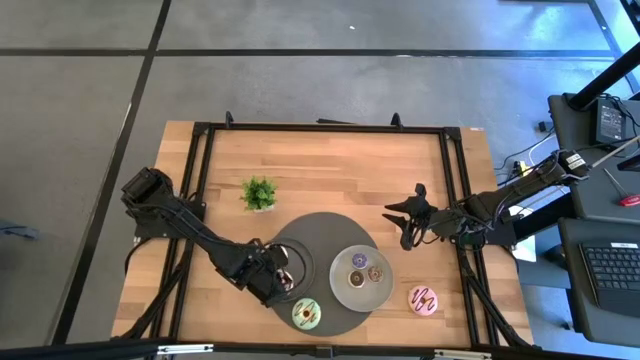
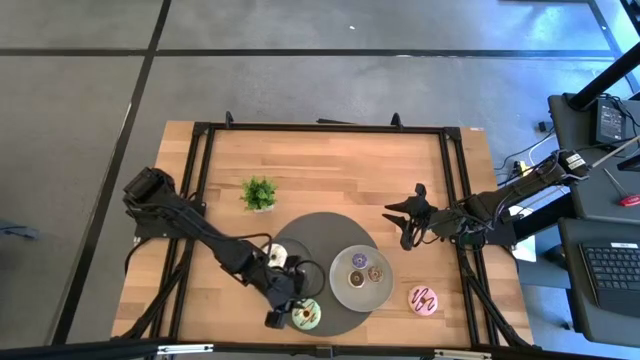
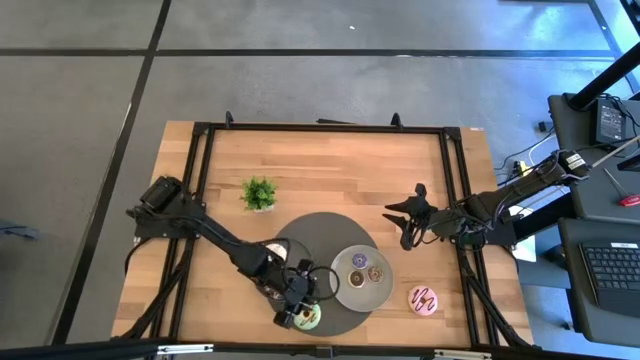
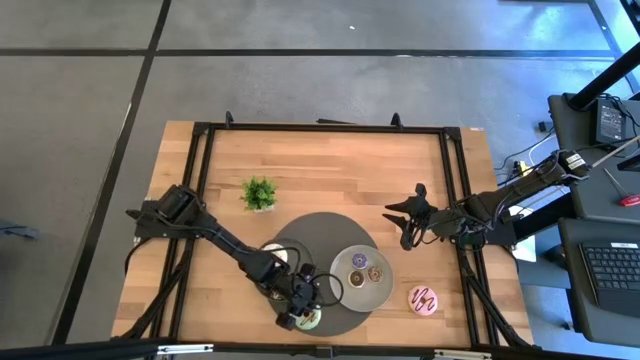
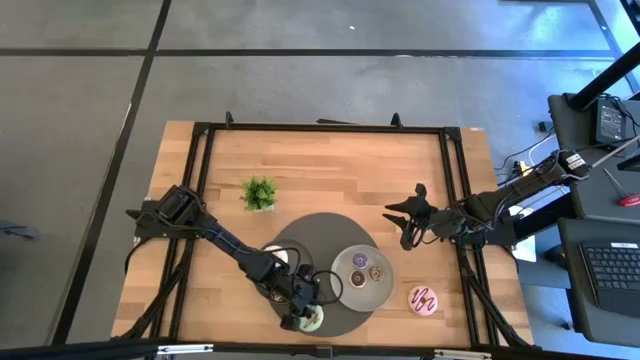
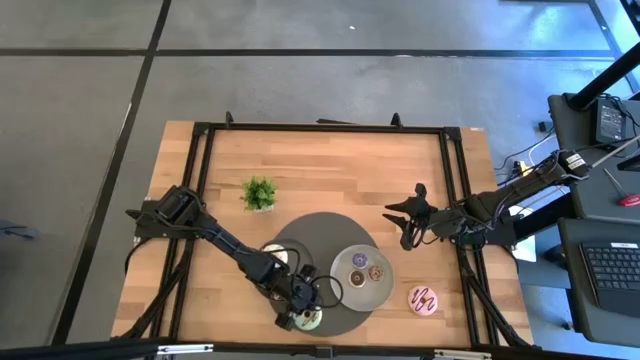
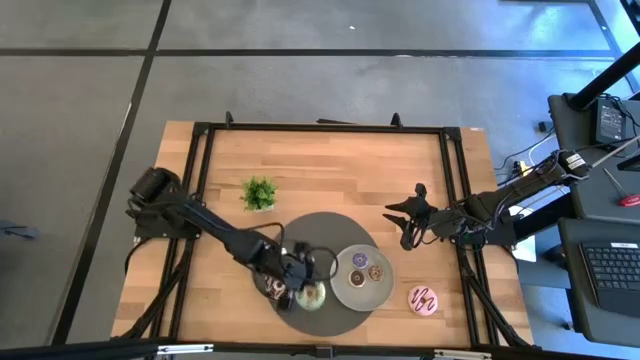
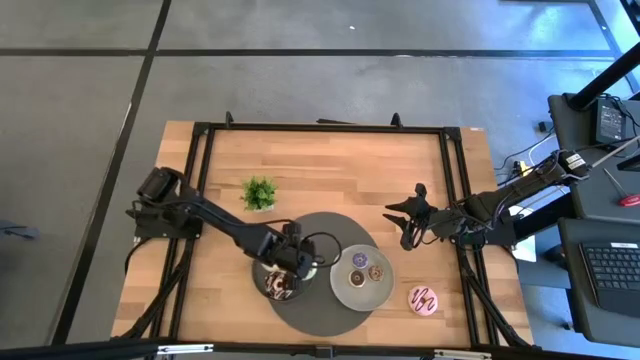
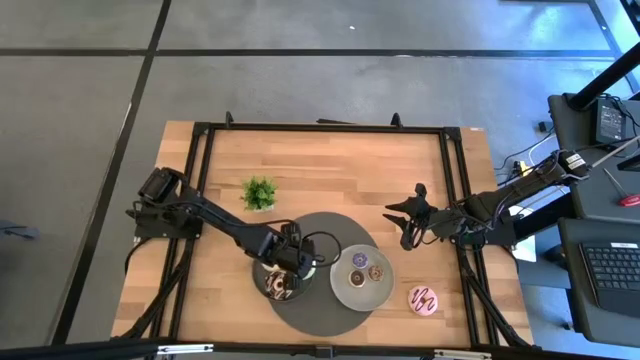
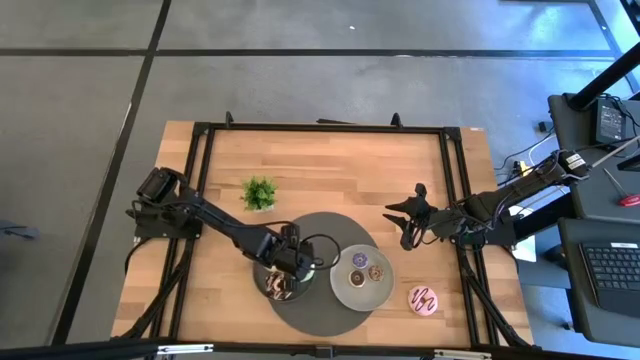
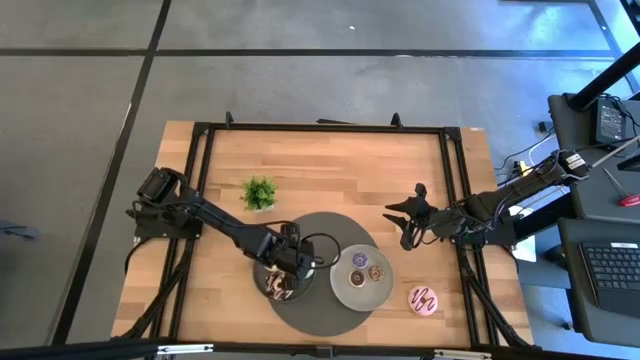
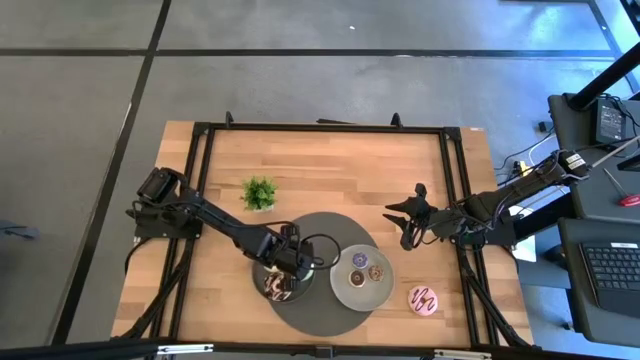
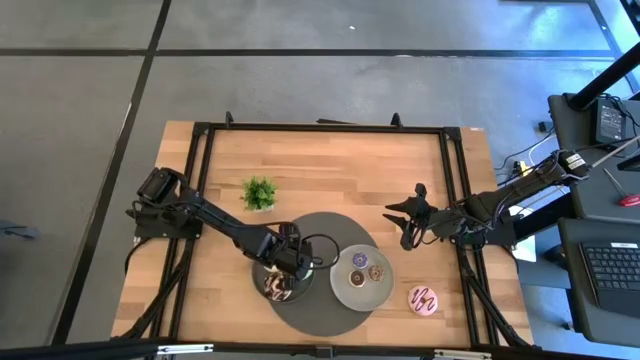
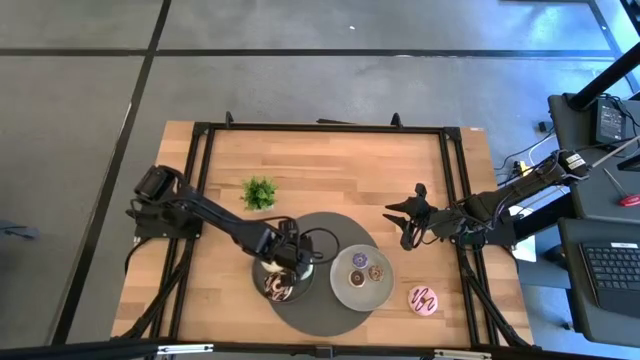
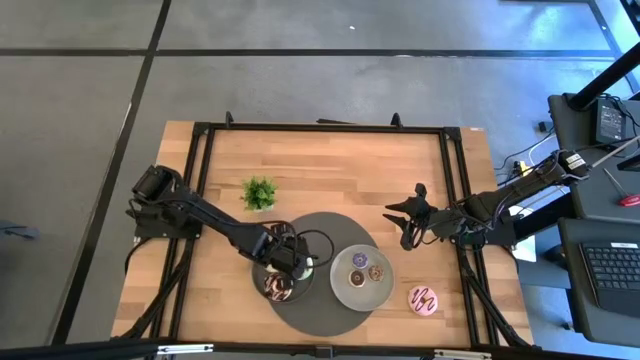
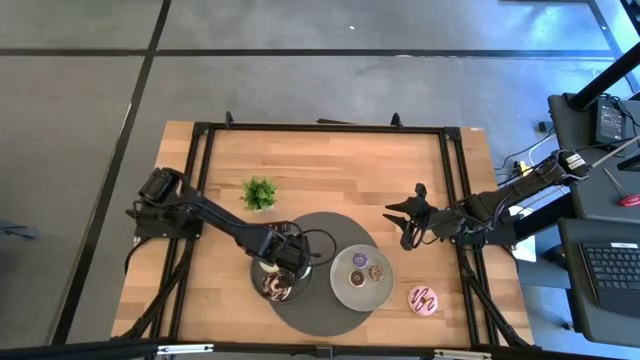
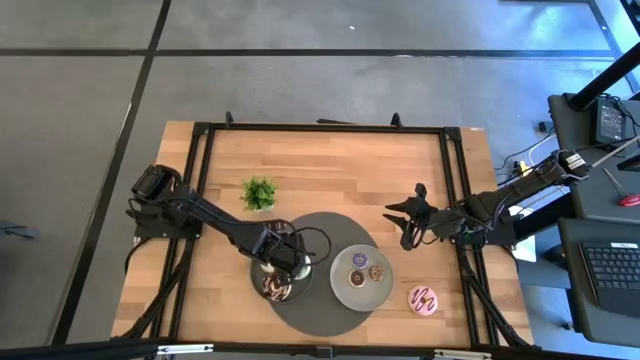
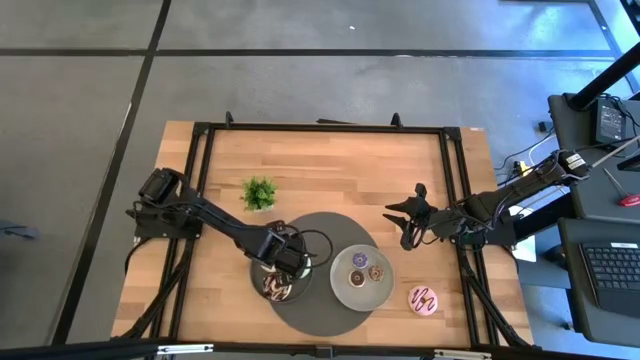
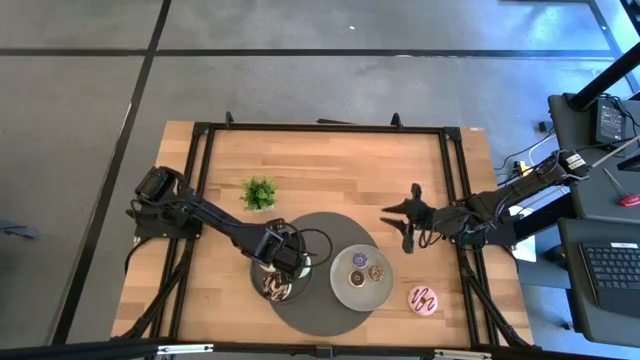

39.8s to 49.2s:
Task: Pick & Place donuts
Put the large green donut on the dark gray plate

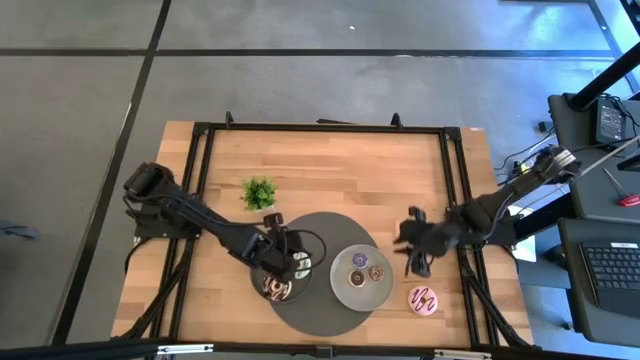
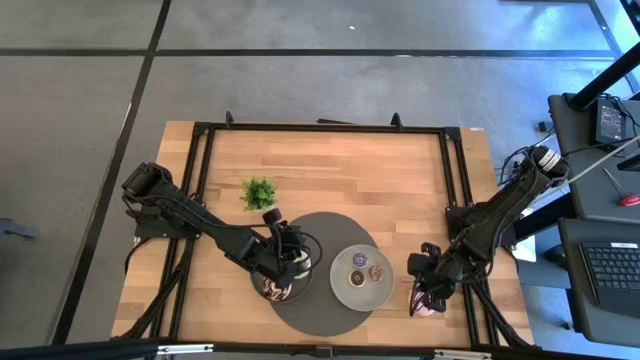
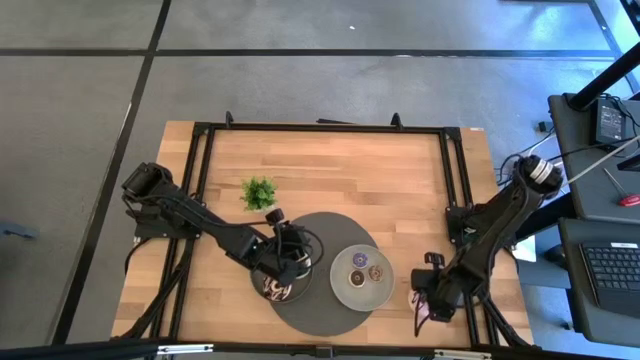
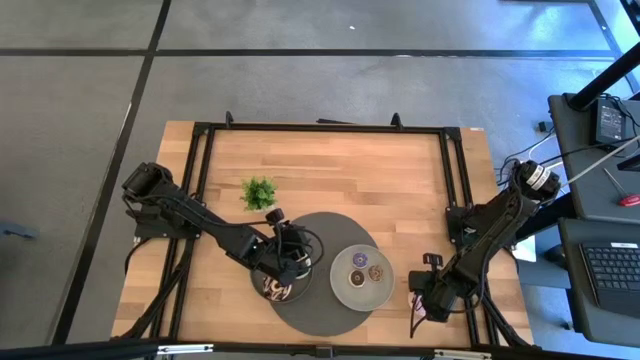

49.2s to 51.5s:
Put the large pink donut on the dark gray plate

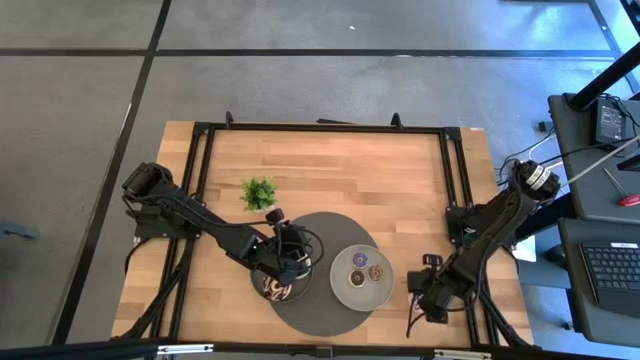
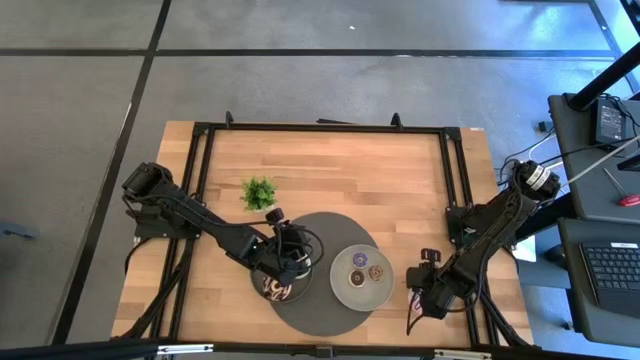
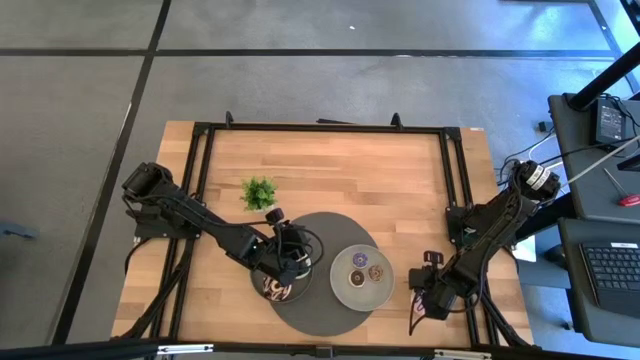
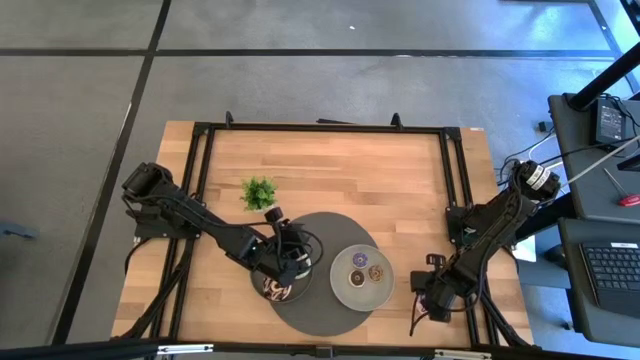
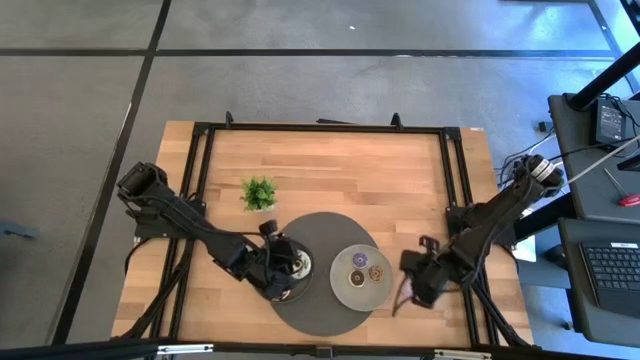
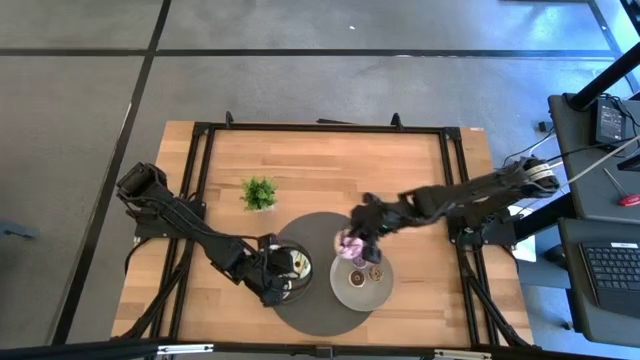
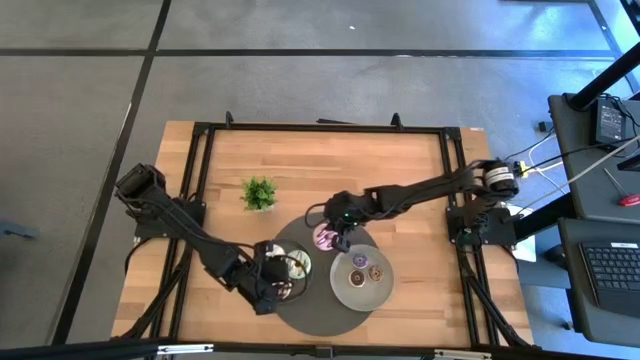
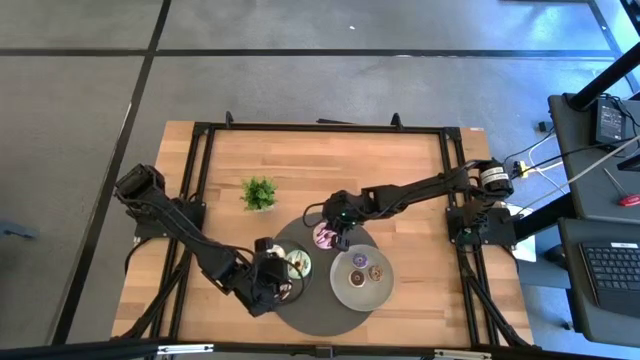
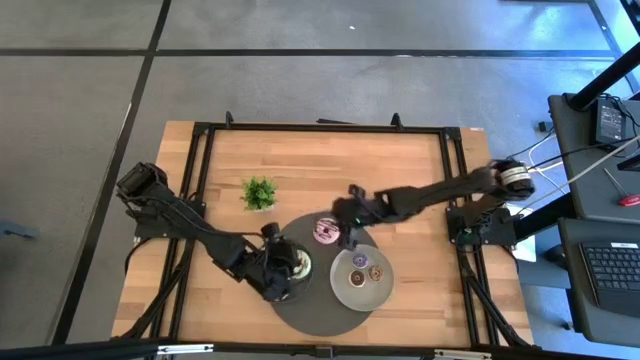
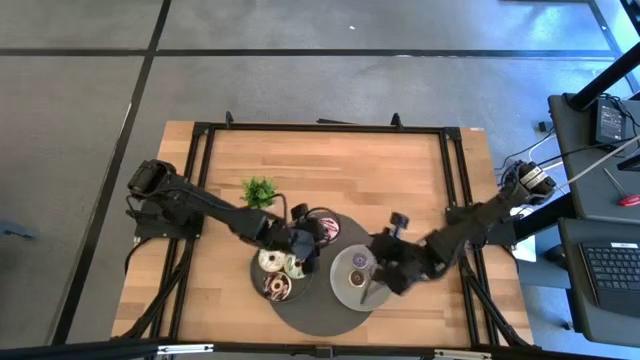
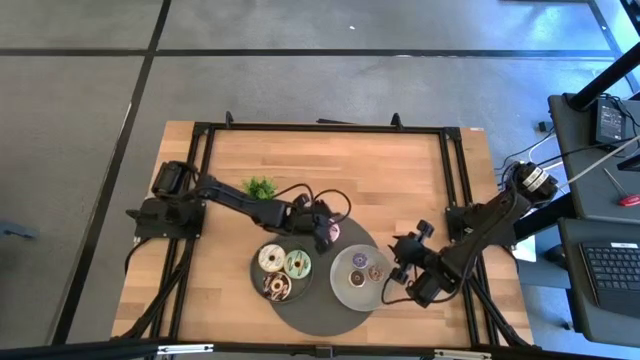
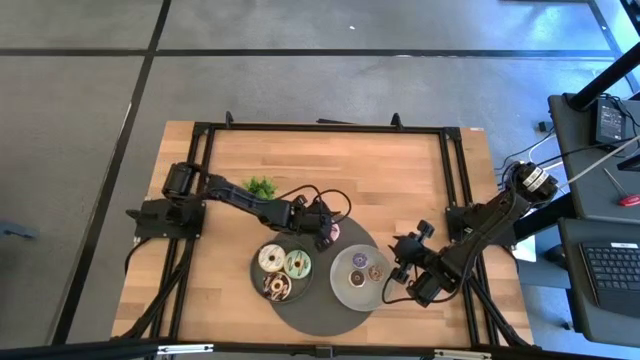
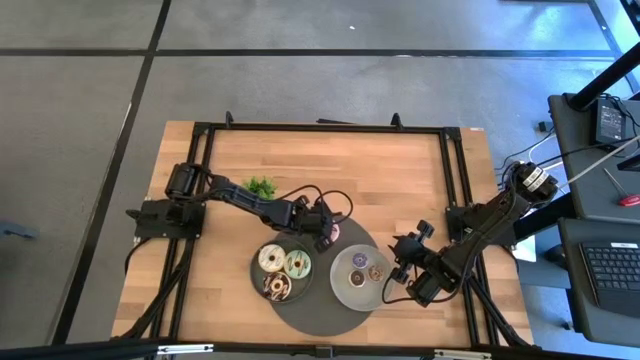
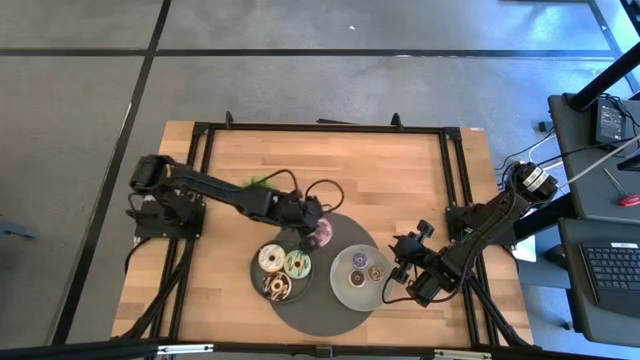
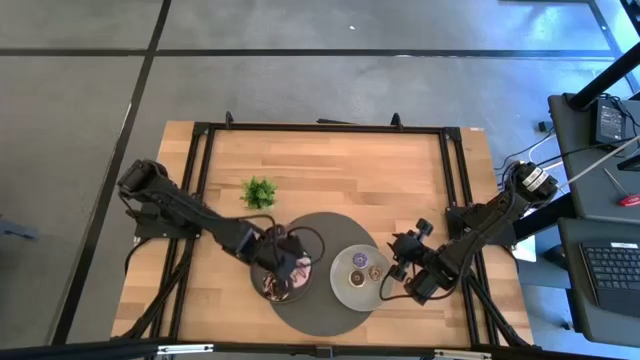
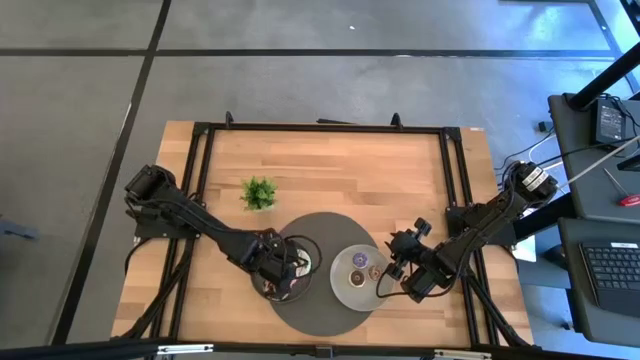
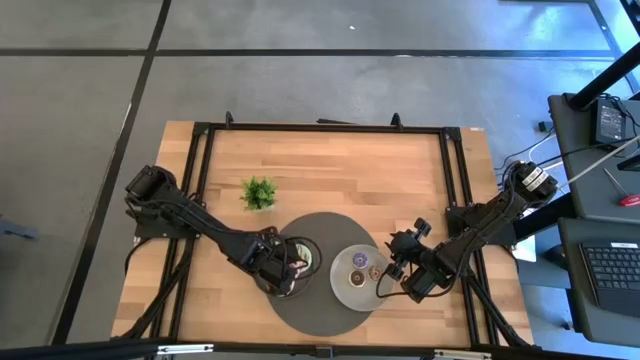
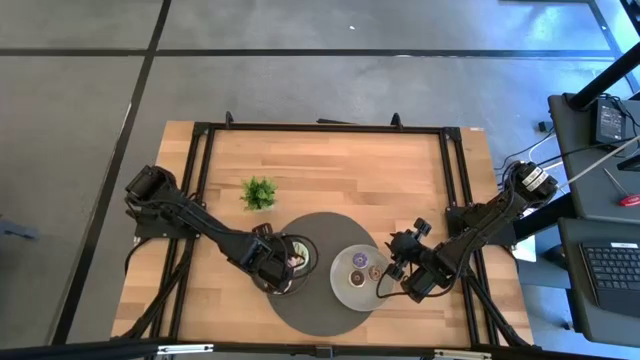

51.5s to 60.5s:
Put the large pink donut on the dark gray plate
